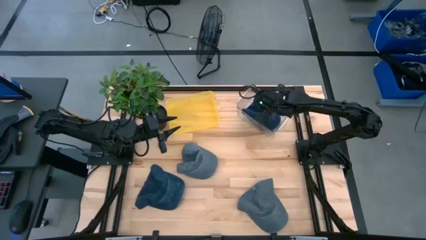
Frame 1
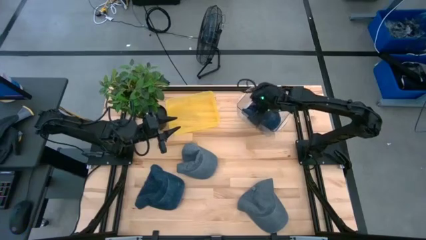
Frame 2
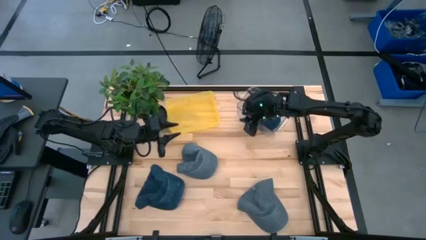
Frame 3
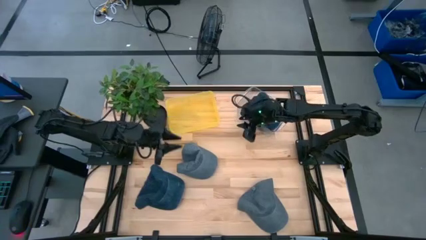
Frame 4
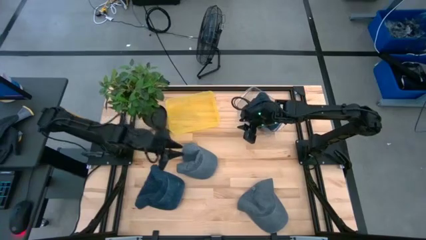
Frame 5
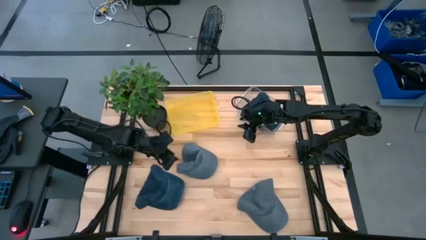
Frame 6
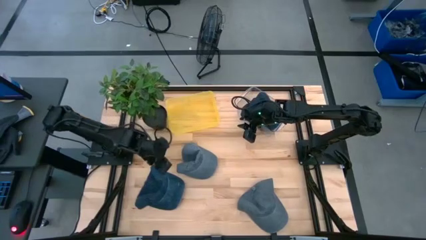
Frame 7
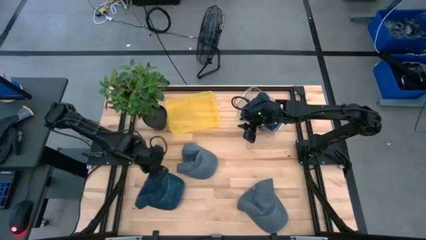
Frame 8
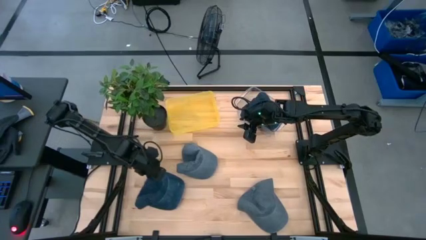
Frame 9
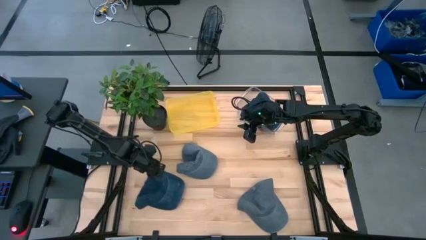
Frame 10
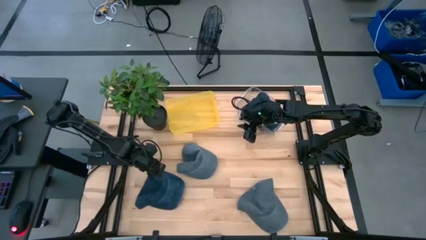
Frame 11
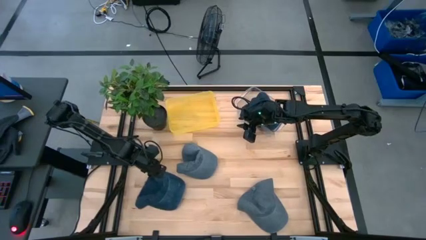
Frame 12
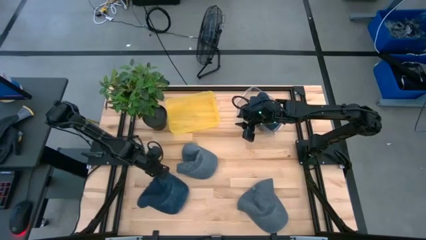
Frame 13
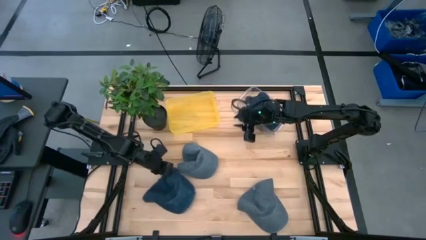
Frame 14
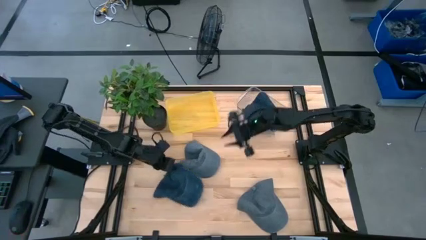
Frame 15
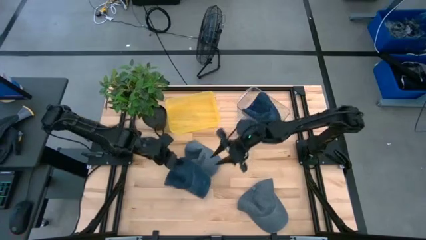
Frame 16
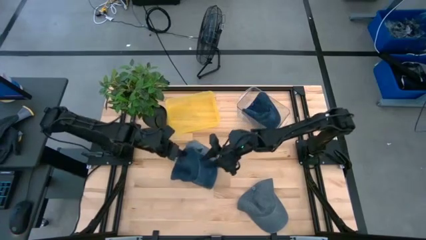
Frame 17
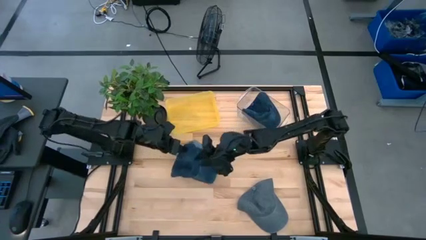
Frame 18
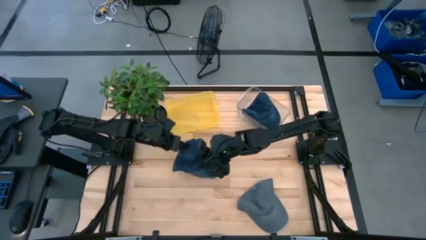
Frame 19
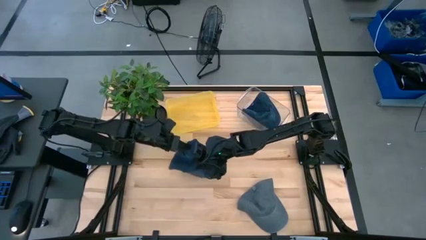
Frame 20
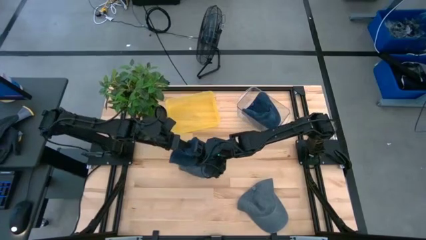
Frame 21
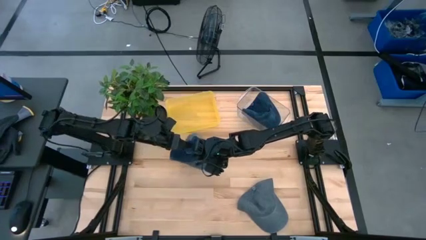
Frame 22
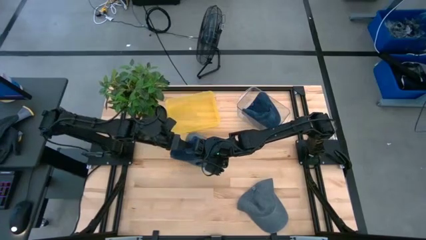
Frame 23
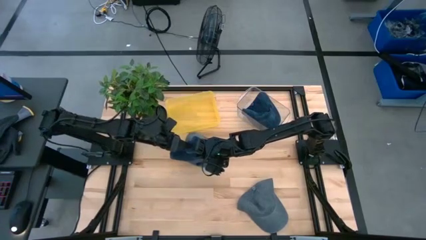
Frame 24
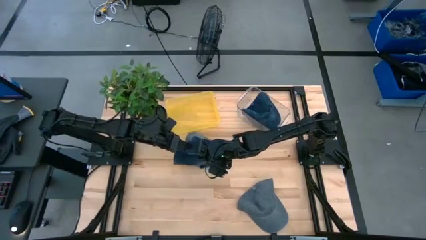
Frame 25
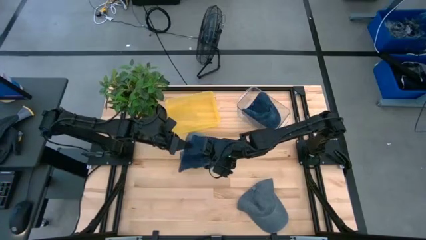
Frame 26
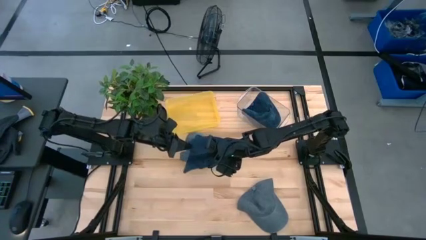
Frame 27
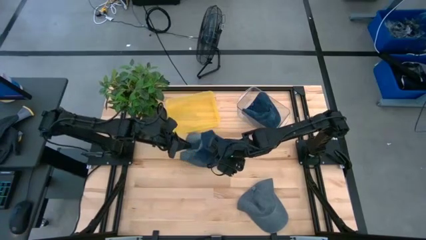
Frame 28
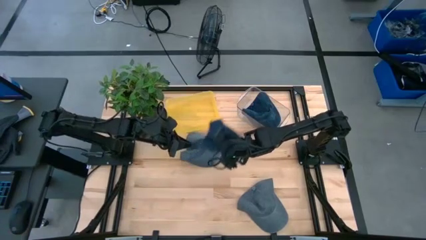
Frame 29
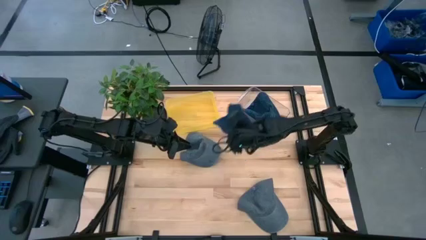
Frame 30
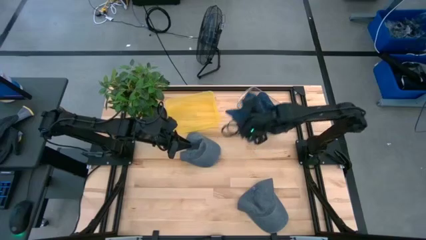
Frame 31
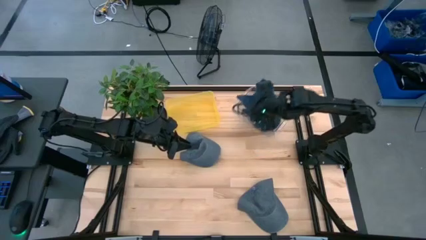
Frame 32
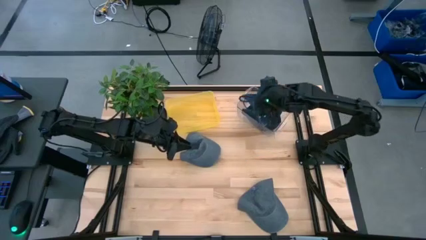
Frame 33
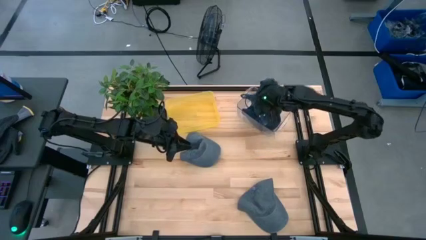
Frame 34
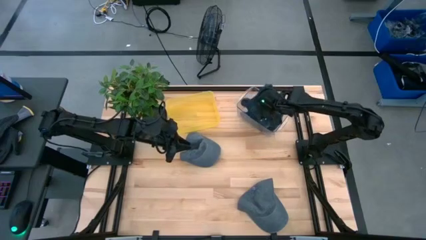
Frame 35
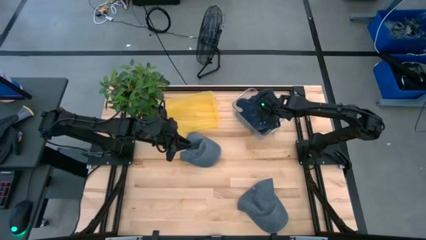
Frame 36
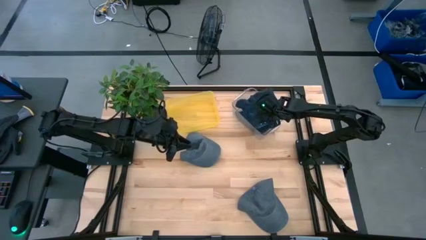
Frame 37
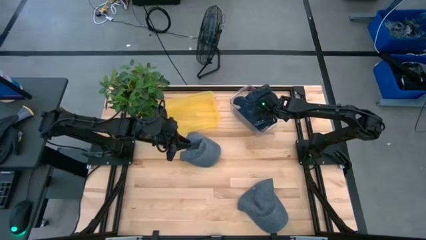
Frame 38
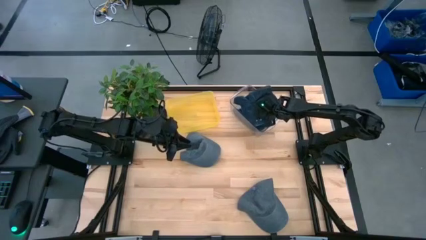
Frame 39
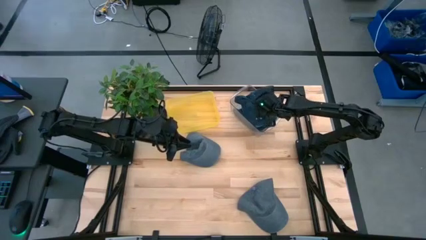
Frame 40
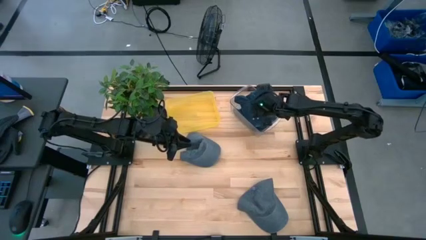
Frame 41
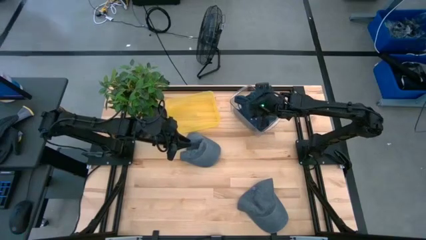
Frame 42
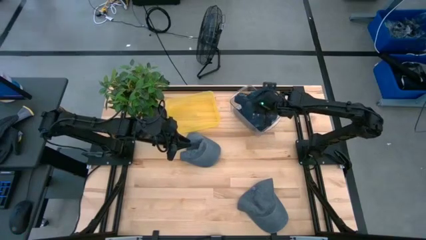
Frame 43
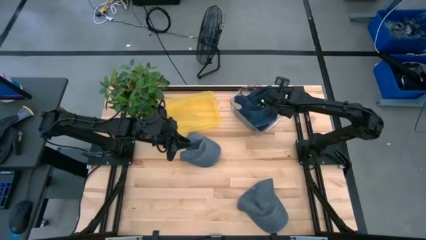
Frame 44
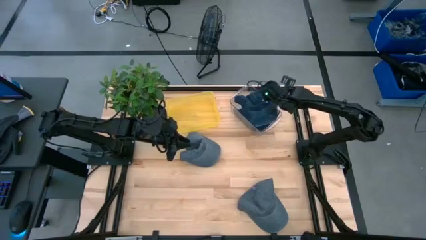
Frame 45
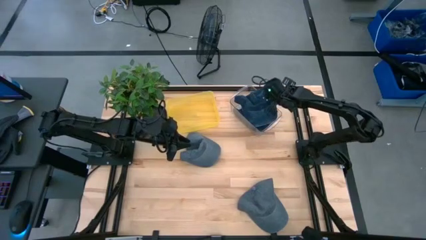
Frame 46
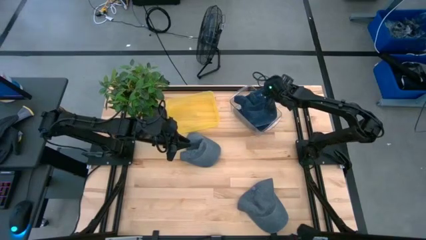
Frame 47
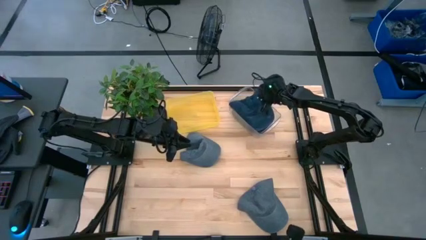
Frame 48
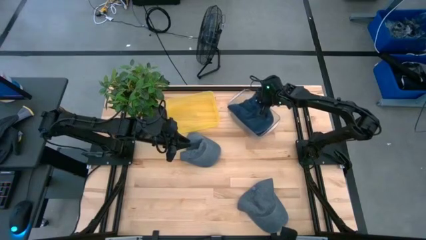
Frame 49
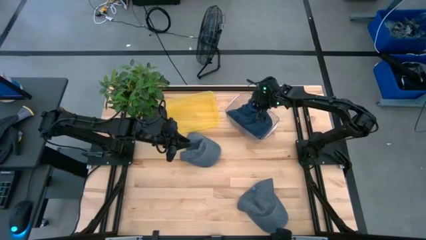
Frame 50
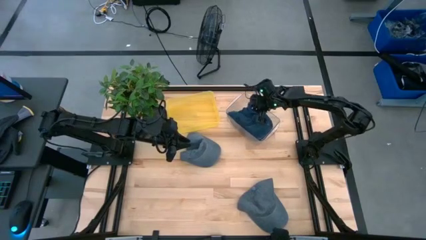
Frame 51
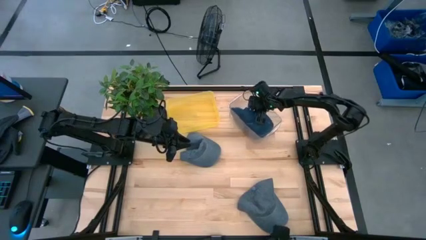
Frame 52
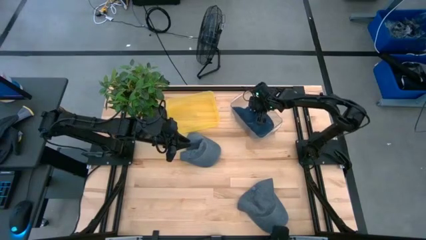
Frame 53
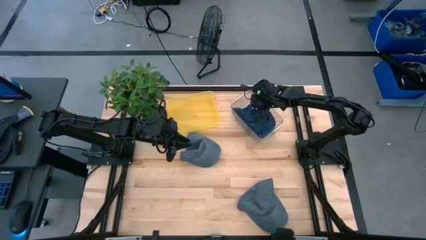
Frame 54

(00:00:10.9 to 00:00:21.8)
Task: Pick & Place hat
Put the blue cap into the transparent bin

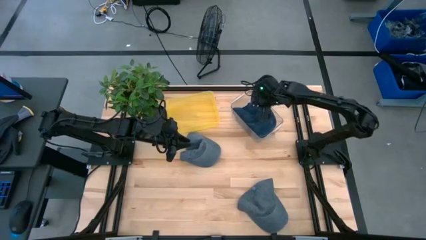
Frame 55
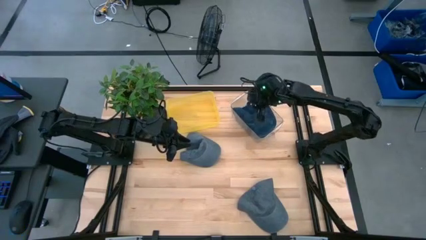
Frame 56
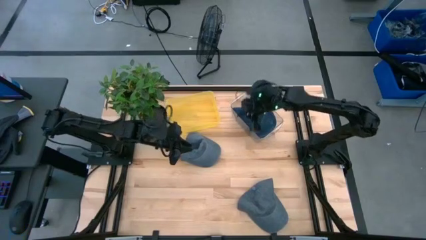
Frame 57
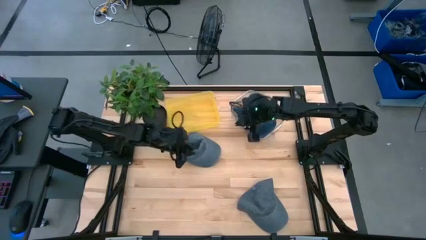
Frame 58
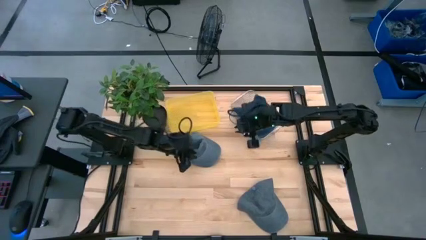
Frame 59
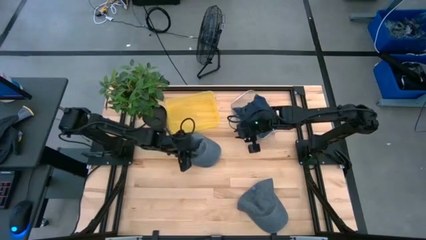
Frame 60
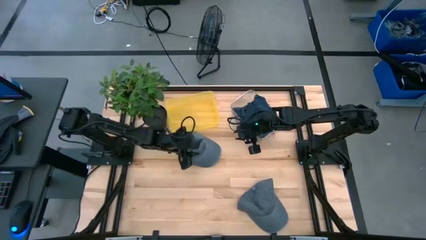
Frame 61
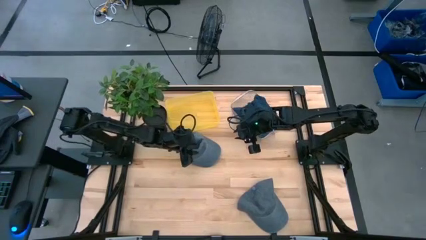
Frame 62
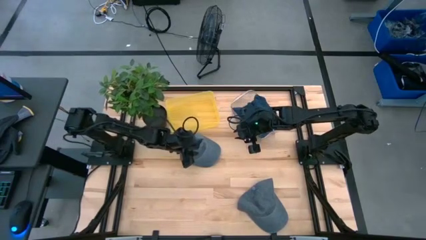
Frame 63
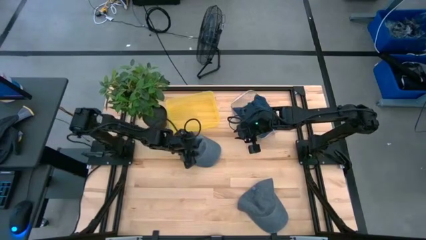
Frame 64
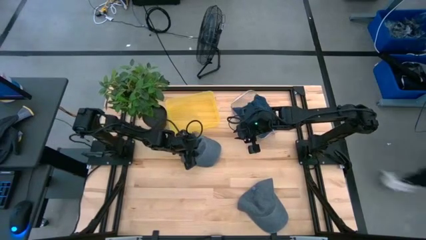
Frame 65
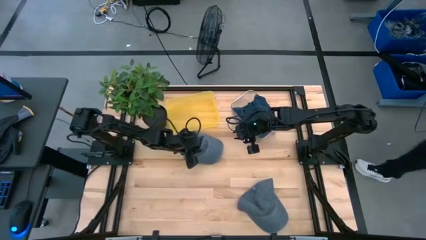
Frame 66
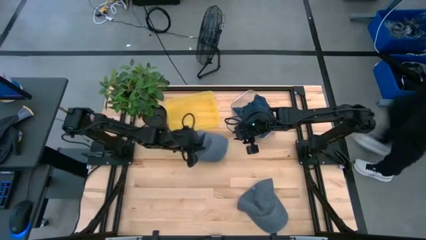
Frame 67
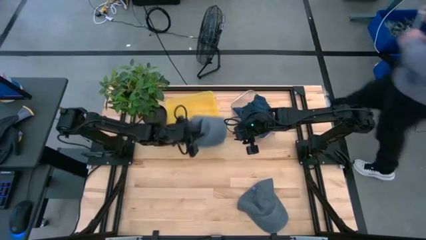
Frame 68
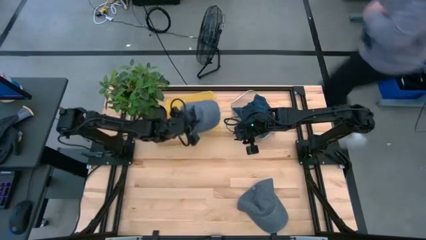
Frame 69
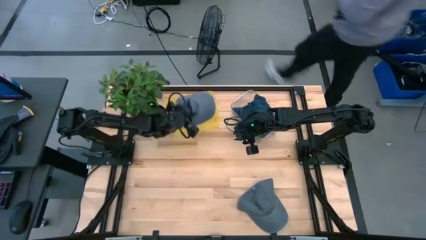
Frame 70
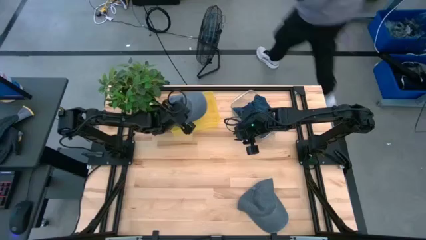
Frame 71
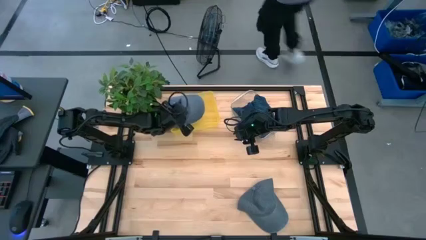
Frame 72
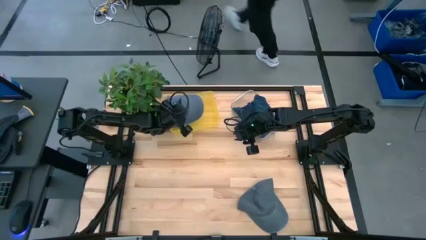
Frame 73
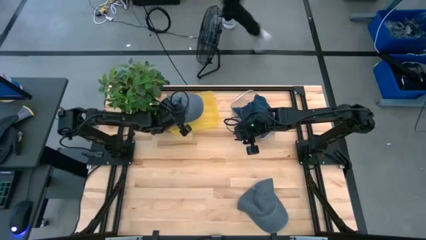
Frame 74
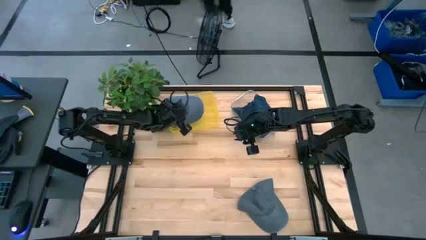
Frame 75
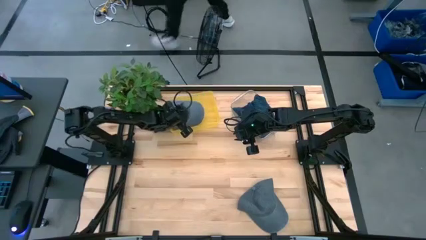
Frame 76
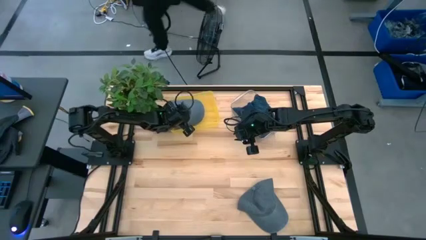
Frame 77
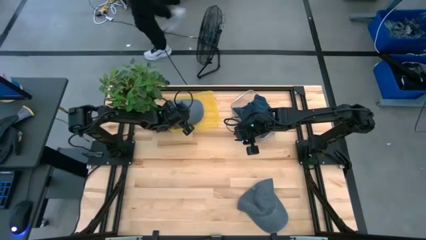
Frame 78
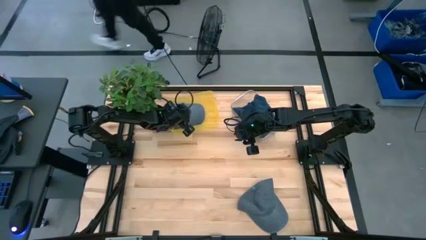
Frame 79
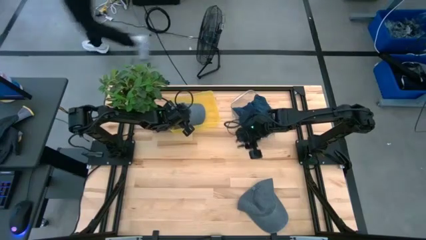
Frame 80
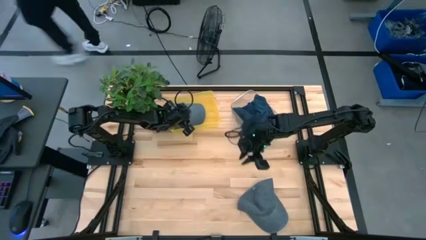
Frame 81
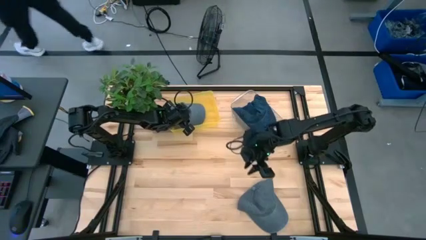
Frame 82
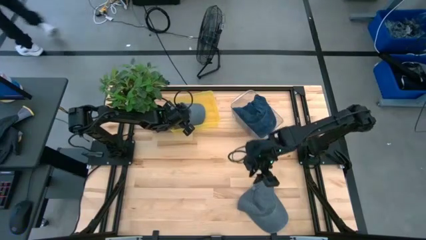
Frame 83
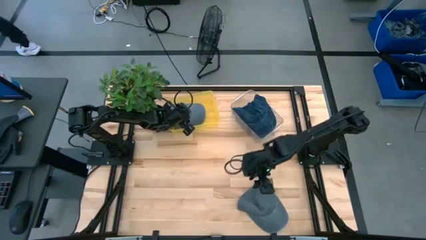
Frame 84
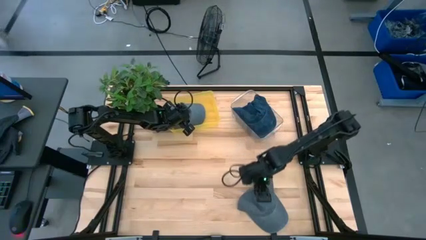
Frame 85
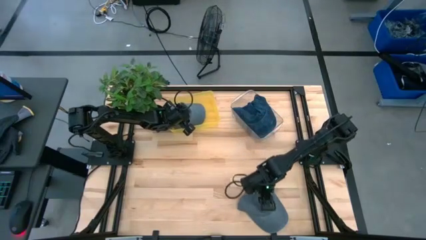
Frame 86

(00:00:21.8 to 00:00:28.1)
Put the top gray cap into the yellow bin
